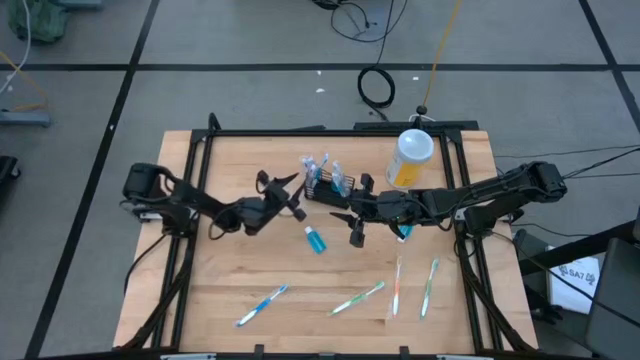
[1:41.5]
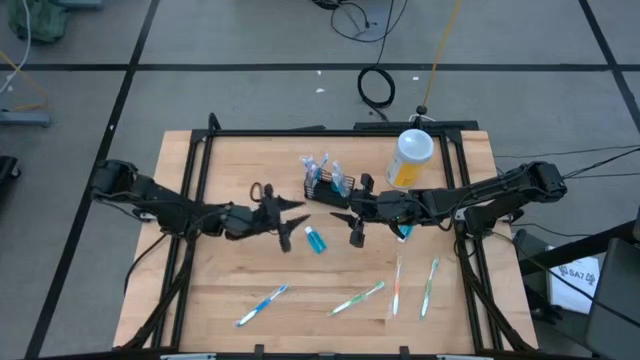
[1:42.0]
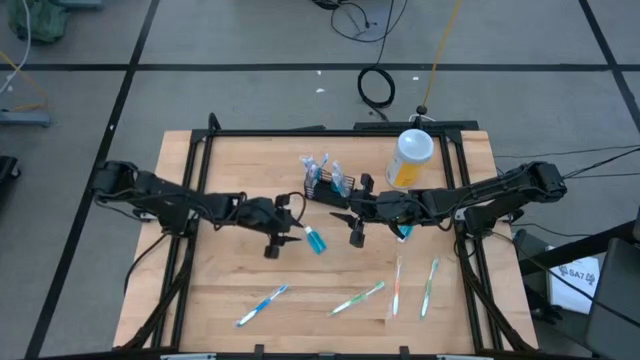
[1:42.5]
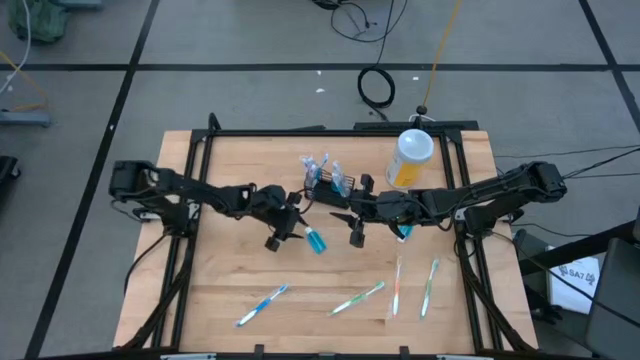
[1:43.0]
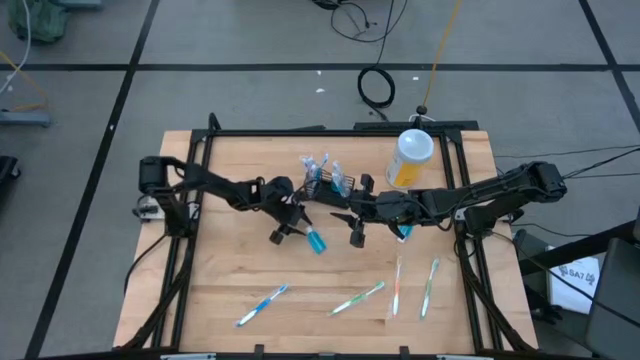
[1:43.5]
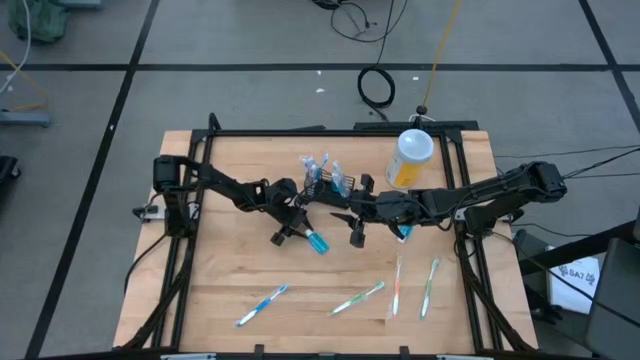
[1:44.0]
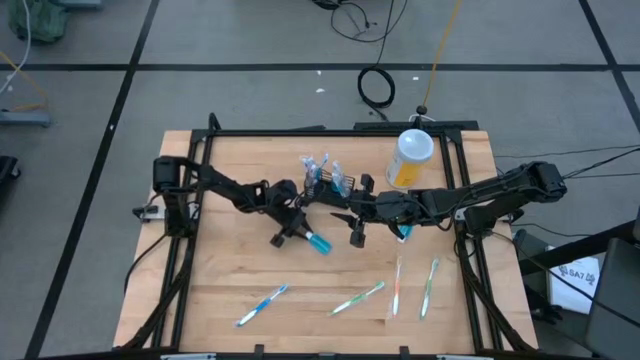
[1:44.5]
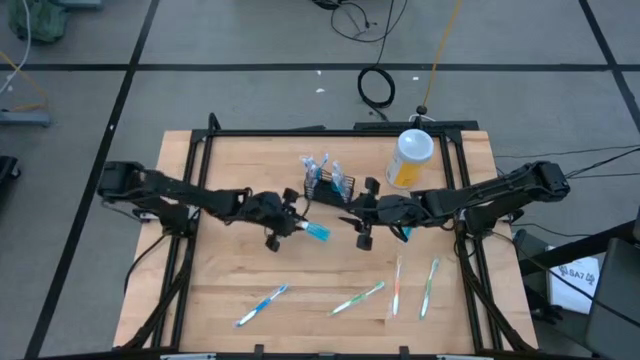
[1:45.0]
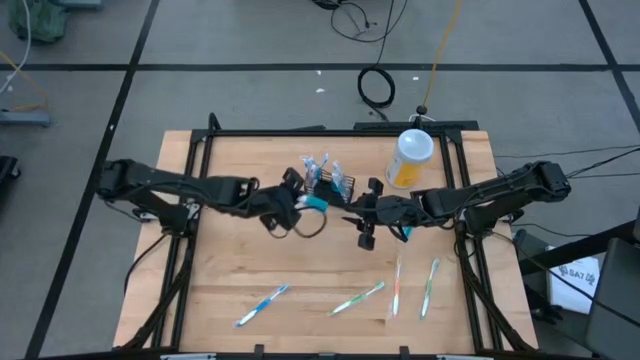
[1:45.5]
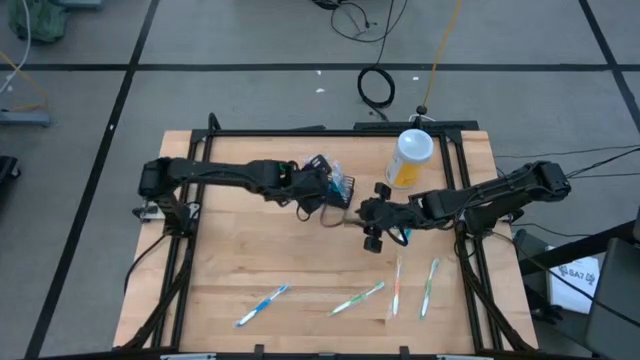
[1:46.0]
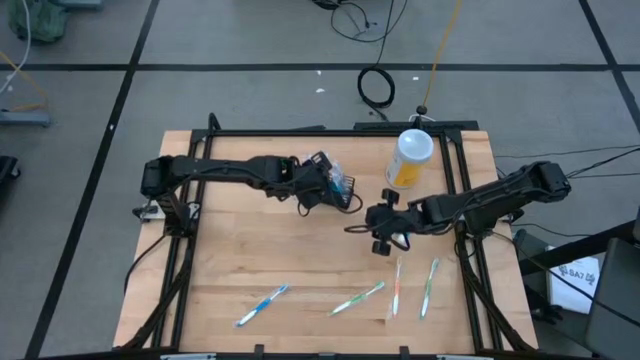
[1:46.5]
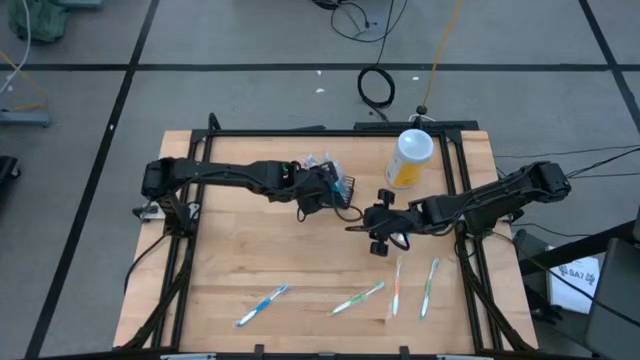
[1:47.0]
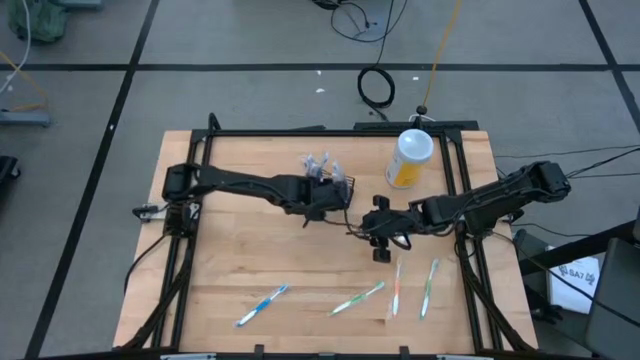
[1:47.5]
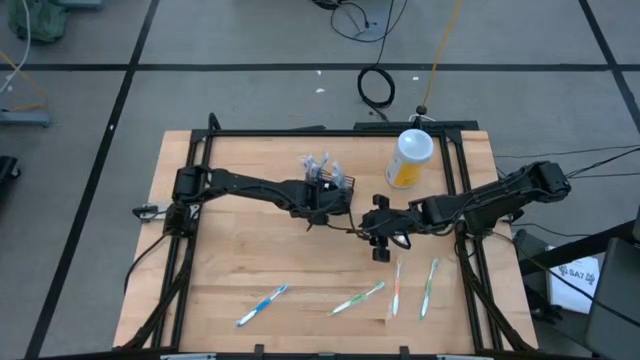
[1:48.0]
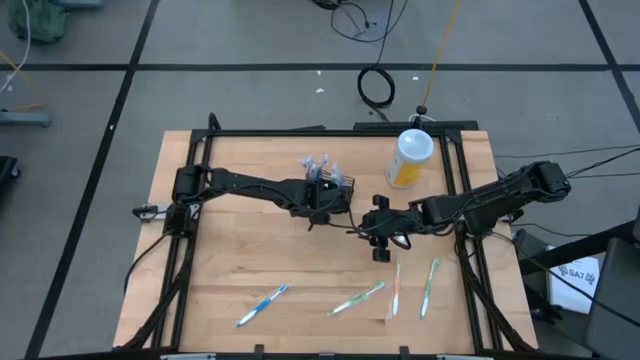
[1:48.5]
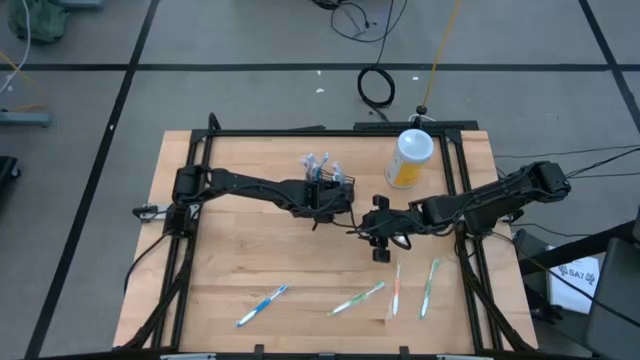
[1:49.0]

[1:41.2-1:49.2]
Task: Pick & Place toothbrushing station
Put the blue mouthwash into the black wire organizer

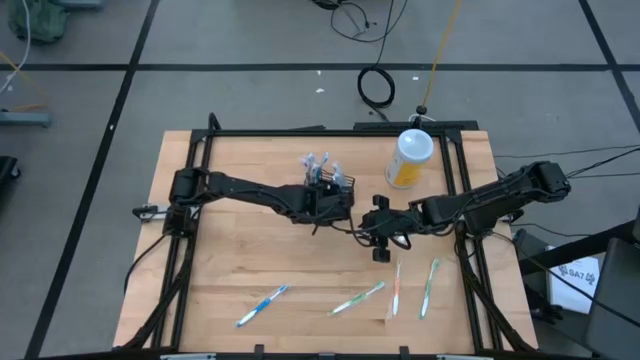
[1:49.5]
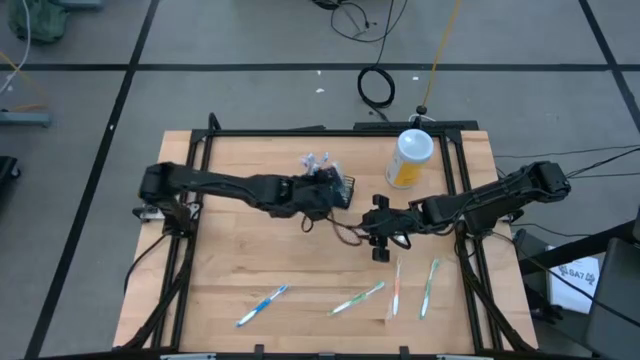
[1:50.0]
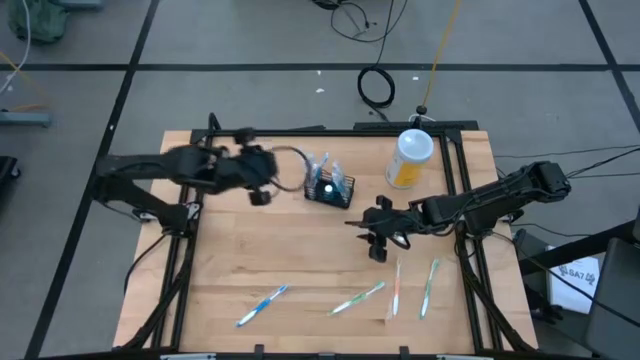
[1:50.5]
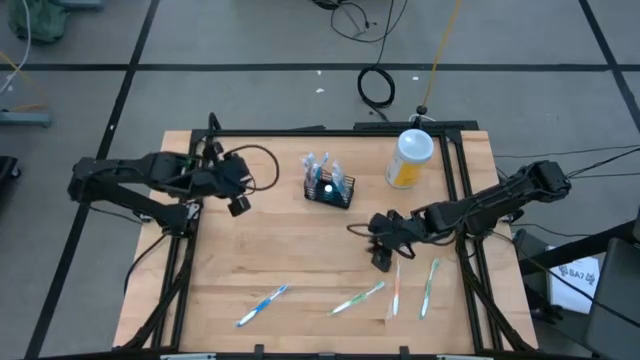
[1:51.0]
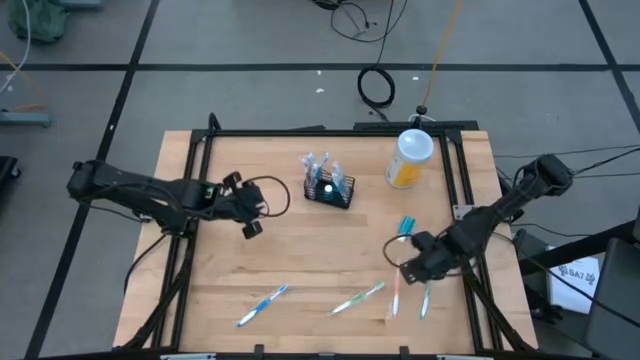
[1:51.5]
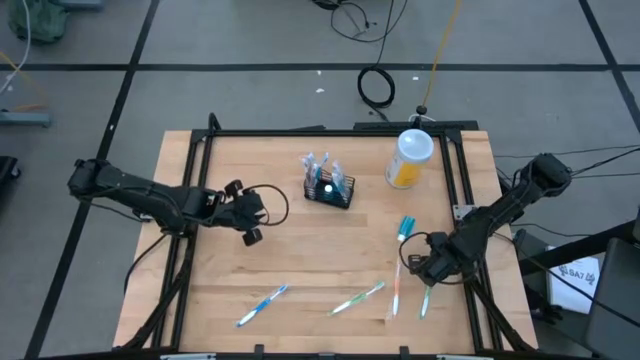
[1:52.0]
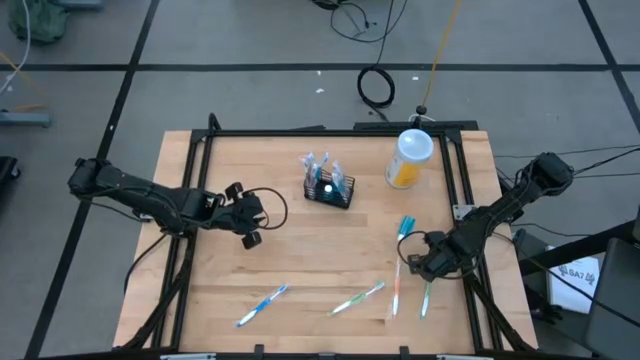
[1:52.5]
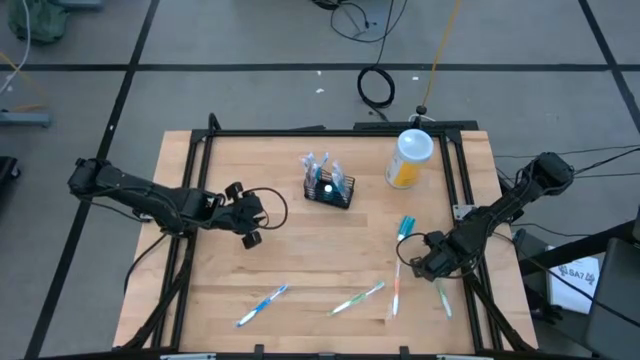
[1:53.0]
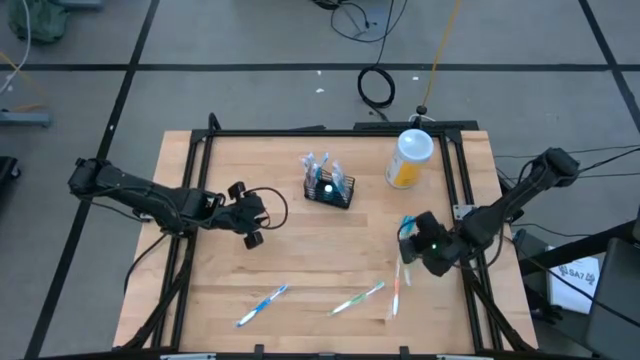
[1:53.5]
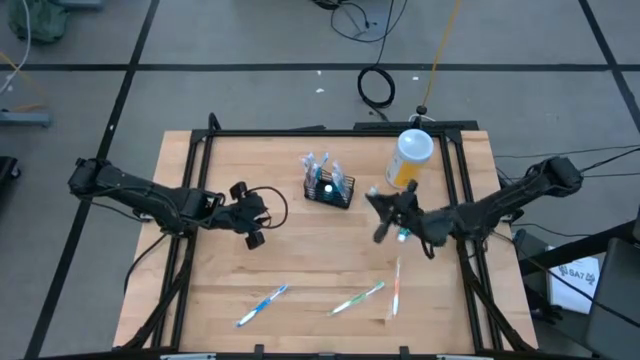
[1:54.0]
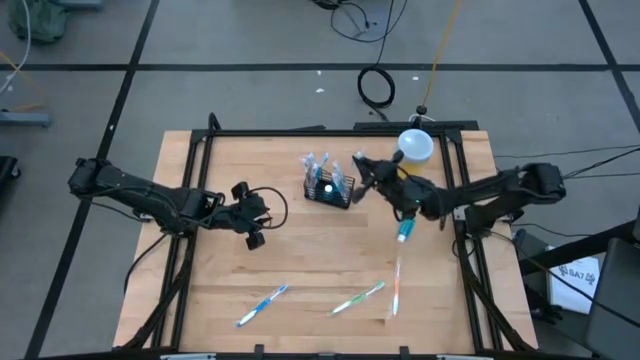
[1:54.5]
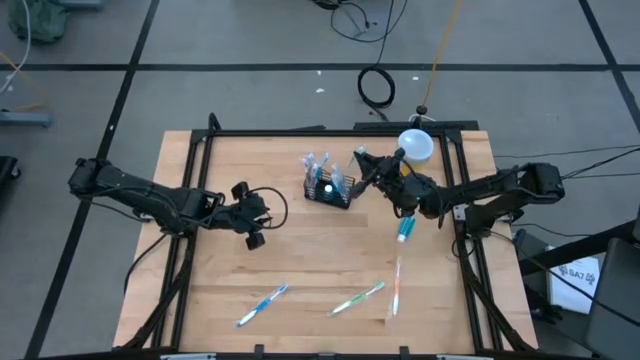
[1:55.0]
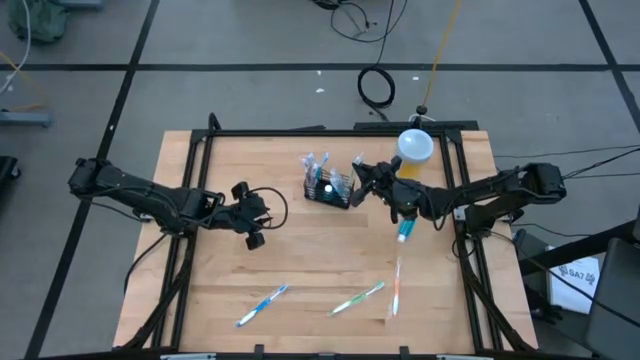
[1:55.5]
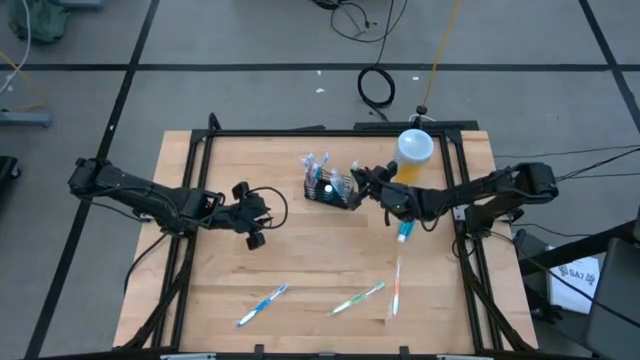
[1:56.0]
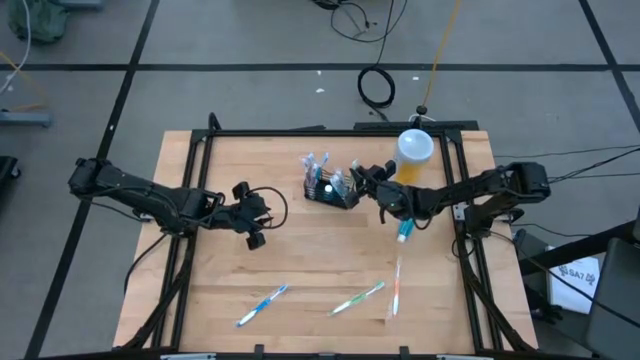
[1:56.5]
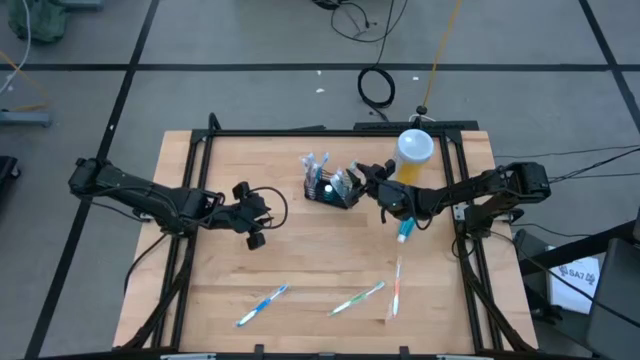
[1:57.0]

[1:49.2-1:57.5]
Put the green toothbrush into the black wire organizer

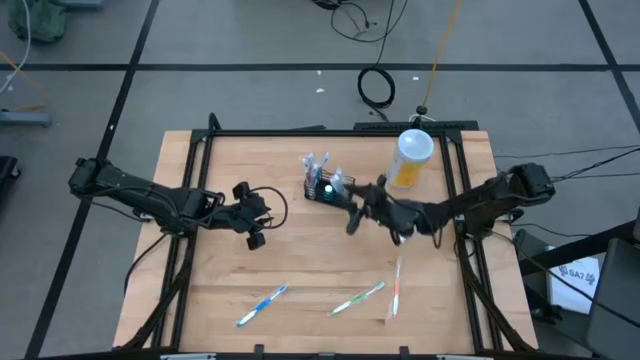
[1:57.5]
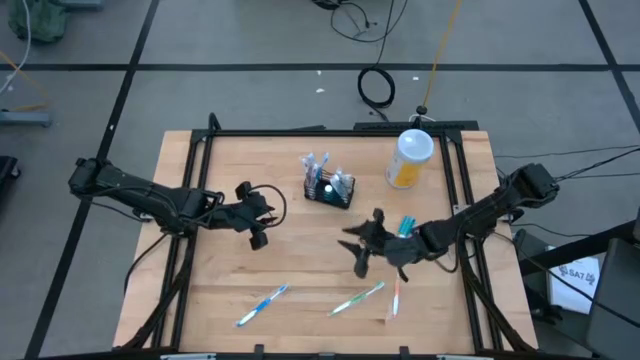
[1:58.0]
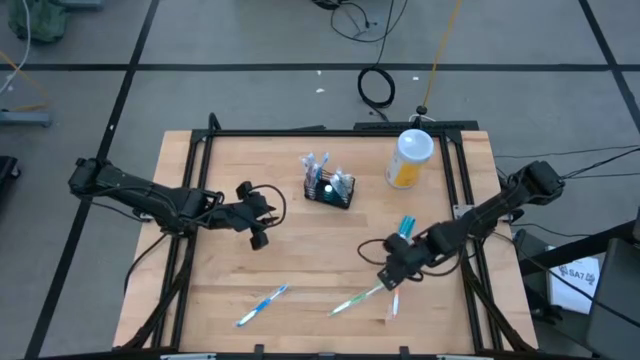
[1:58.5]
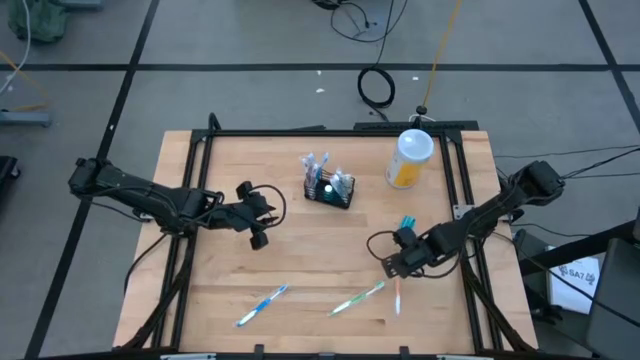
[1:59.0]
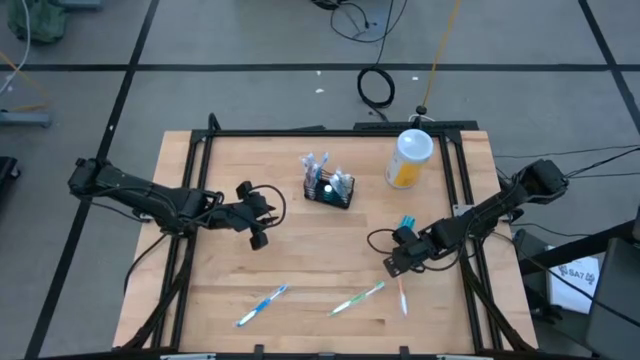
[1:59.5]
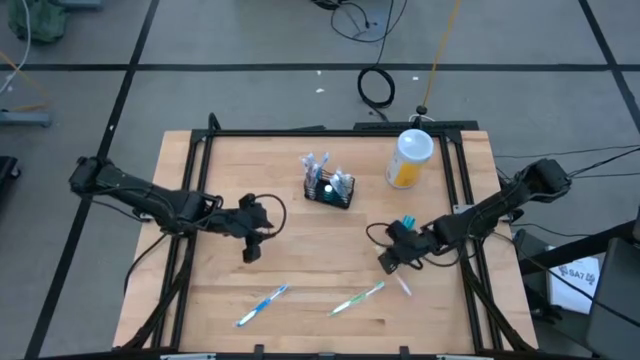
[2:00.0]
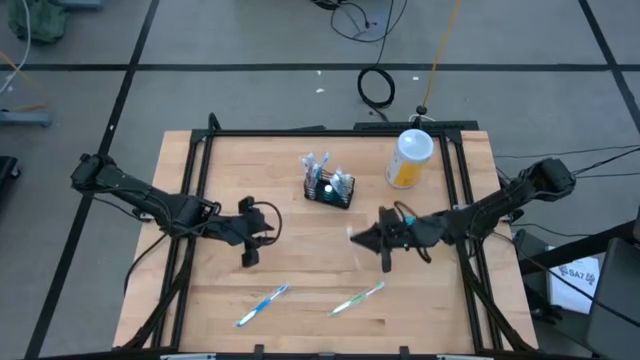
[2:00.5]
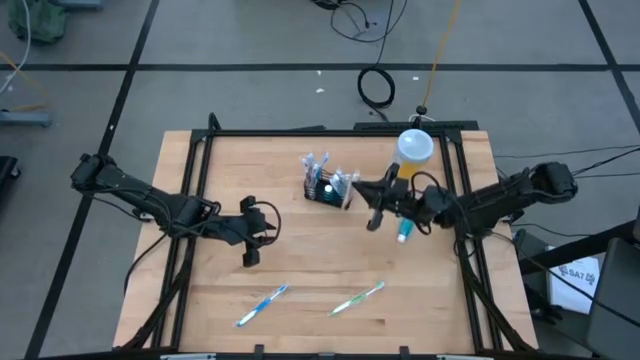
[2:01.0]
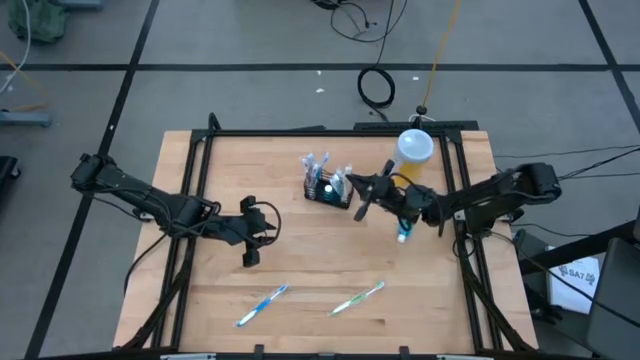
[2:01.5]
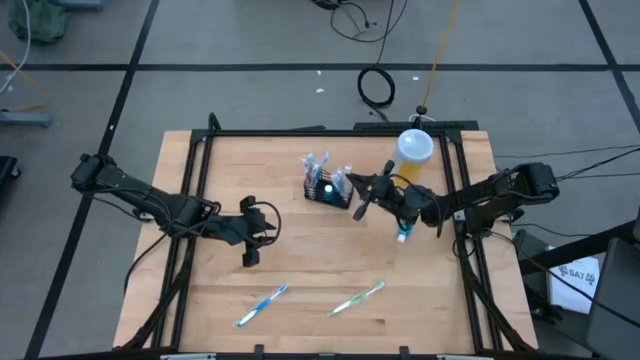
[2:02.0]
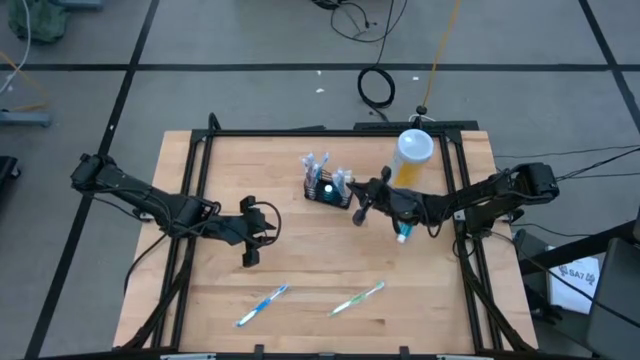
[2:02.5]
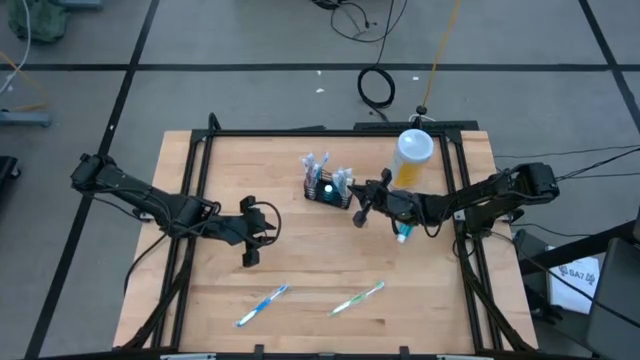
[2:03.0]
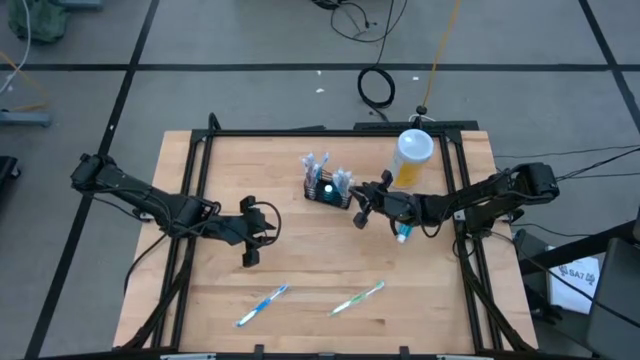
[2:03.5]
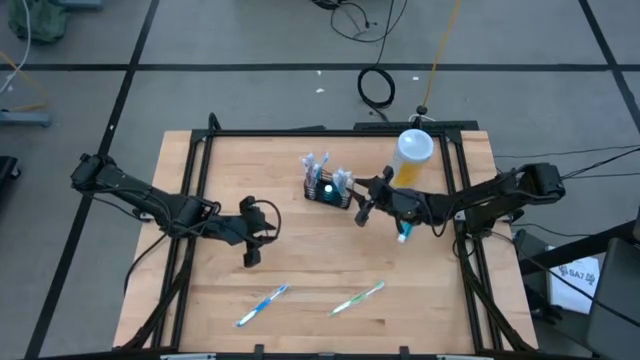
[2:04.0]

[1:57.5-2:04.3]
Put the orange toothbrush into the black wire organizer
